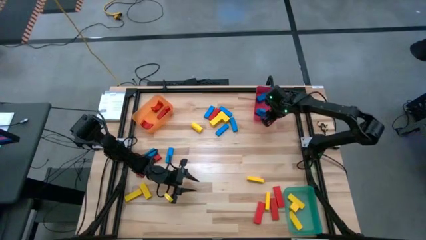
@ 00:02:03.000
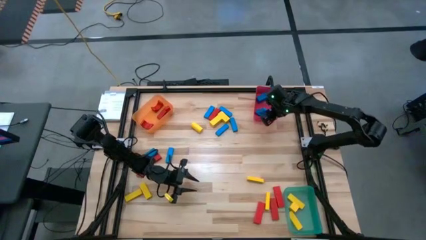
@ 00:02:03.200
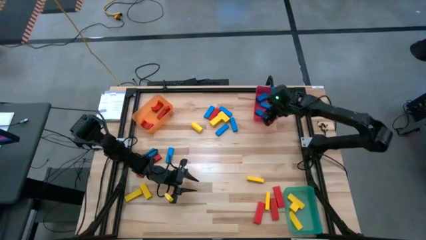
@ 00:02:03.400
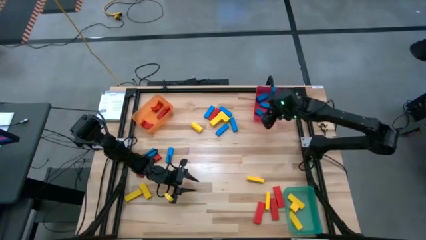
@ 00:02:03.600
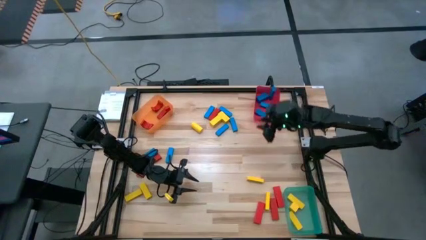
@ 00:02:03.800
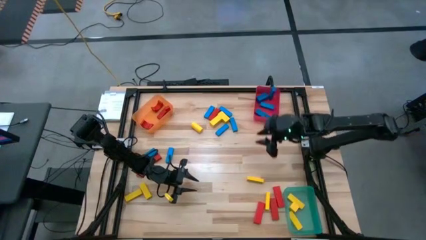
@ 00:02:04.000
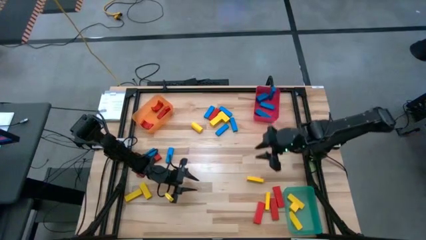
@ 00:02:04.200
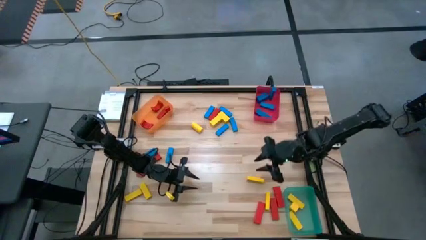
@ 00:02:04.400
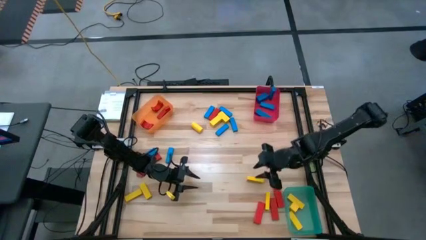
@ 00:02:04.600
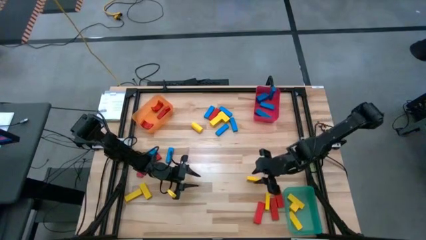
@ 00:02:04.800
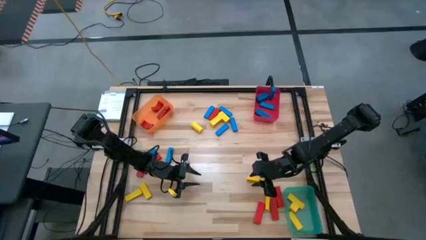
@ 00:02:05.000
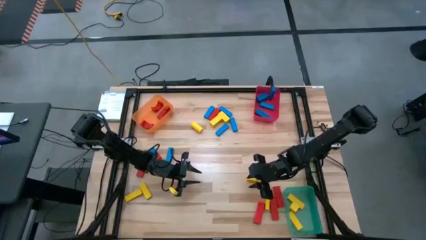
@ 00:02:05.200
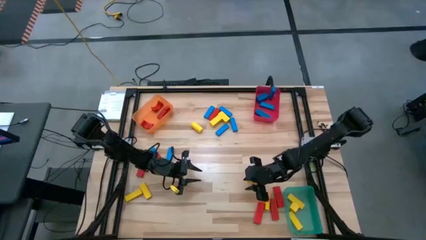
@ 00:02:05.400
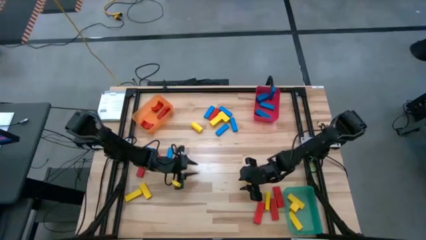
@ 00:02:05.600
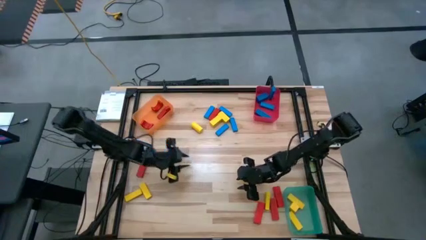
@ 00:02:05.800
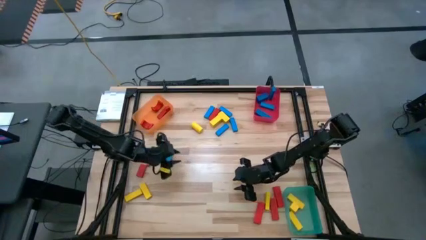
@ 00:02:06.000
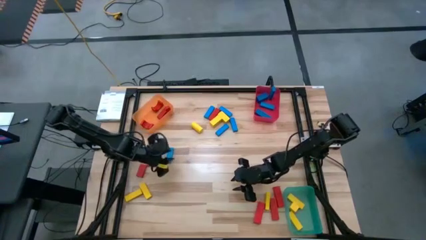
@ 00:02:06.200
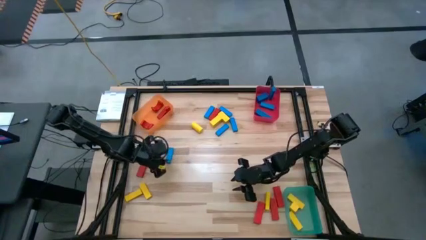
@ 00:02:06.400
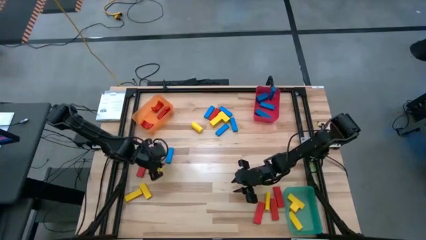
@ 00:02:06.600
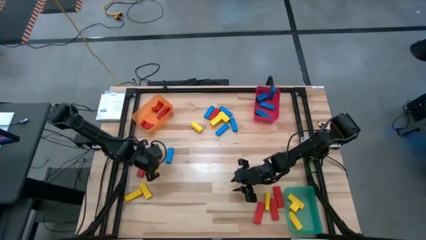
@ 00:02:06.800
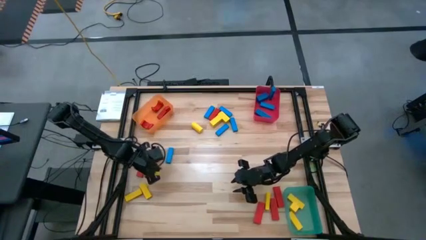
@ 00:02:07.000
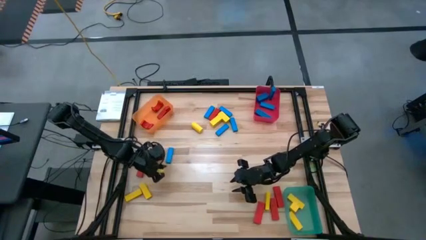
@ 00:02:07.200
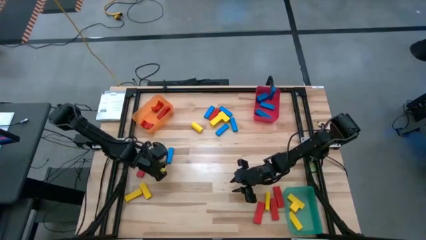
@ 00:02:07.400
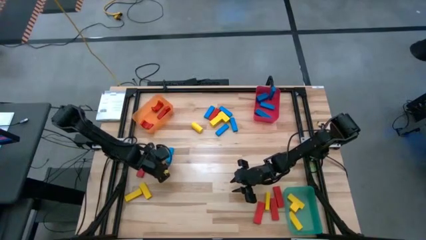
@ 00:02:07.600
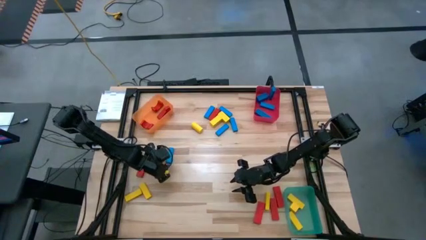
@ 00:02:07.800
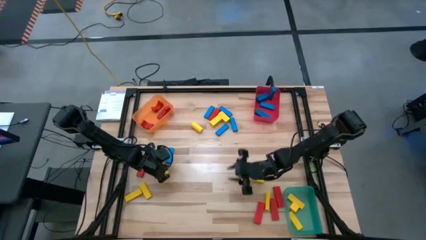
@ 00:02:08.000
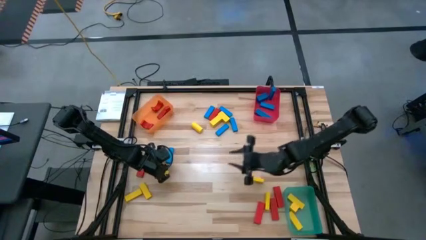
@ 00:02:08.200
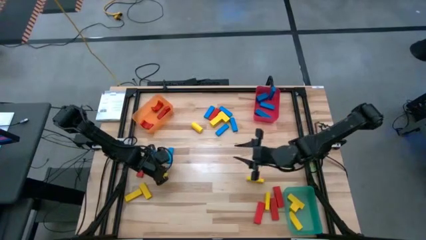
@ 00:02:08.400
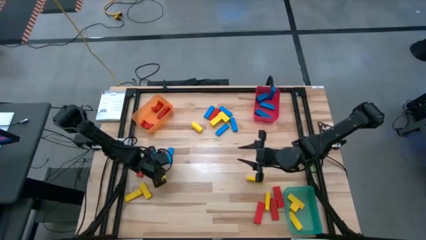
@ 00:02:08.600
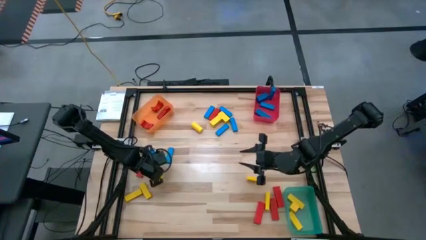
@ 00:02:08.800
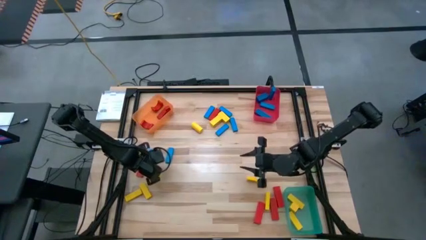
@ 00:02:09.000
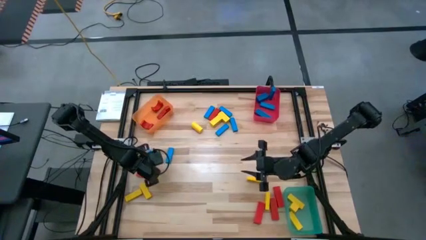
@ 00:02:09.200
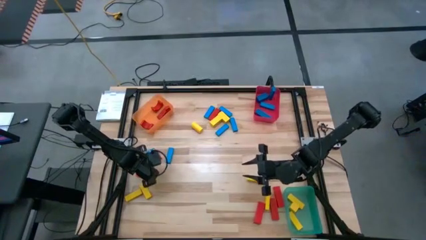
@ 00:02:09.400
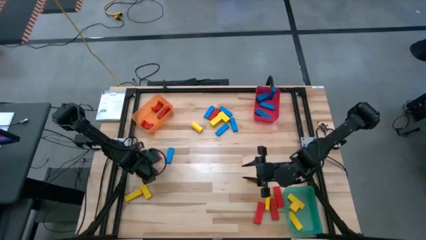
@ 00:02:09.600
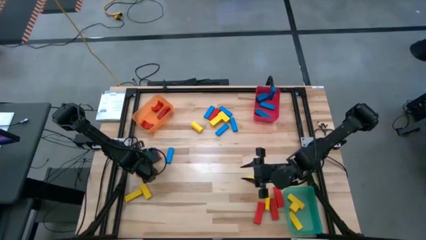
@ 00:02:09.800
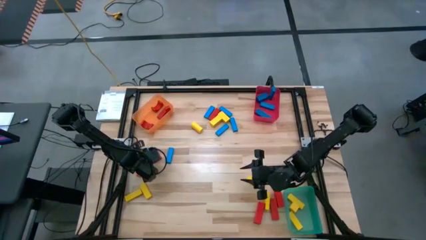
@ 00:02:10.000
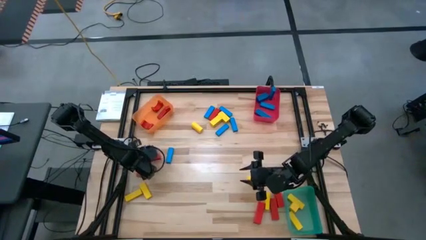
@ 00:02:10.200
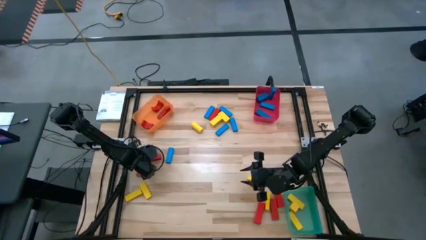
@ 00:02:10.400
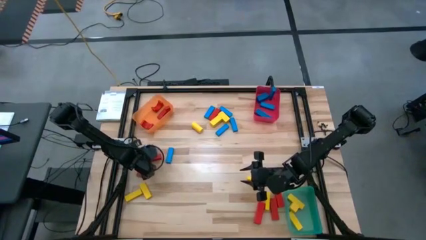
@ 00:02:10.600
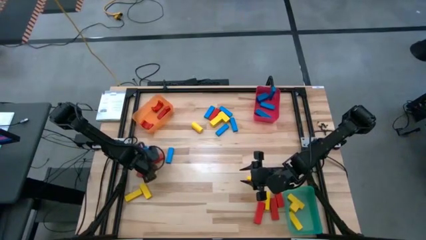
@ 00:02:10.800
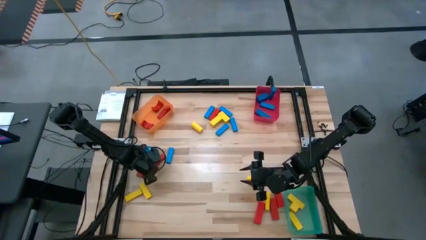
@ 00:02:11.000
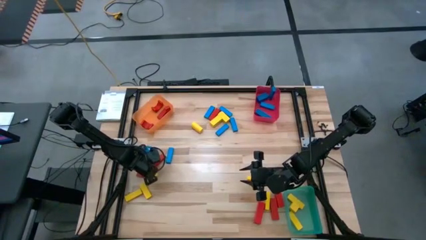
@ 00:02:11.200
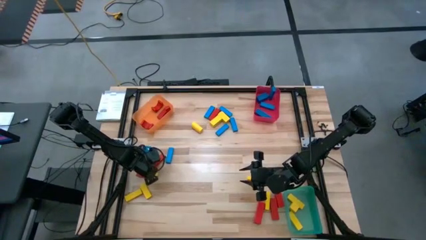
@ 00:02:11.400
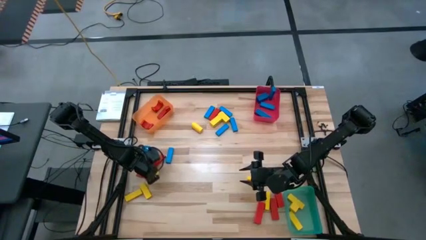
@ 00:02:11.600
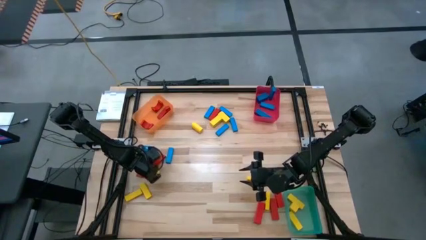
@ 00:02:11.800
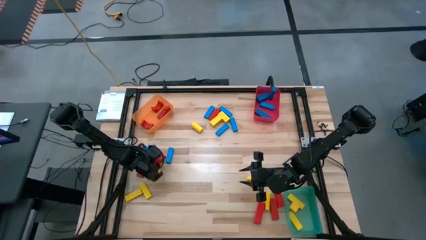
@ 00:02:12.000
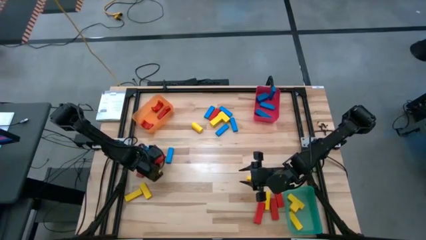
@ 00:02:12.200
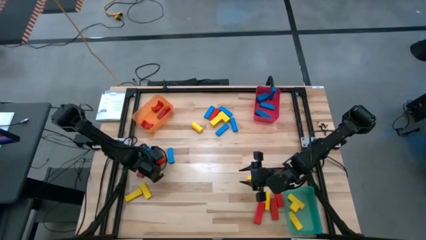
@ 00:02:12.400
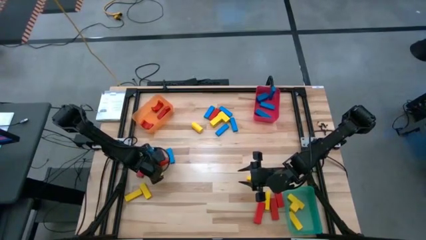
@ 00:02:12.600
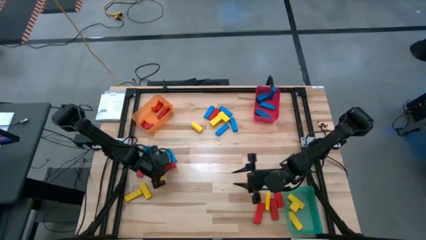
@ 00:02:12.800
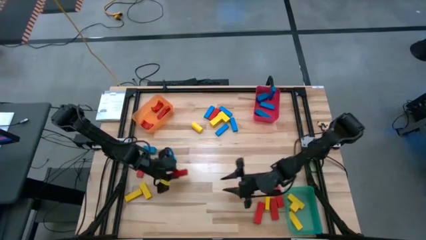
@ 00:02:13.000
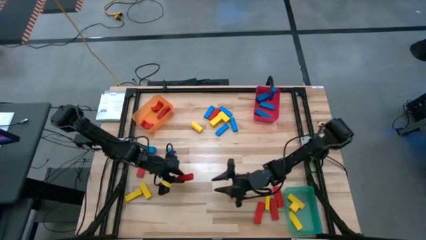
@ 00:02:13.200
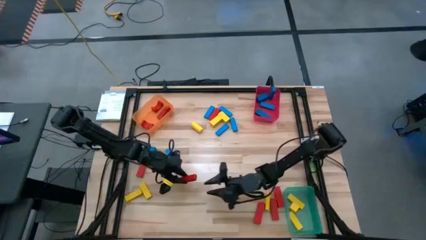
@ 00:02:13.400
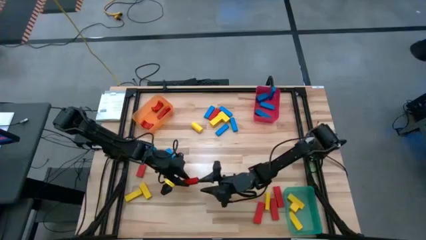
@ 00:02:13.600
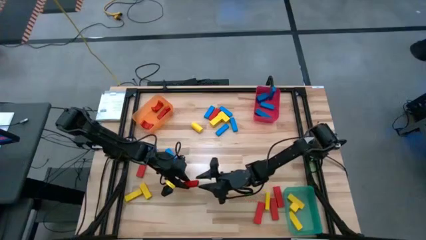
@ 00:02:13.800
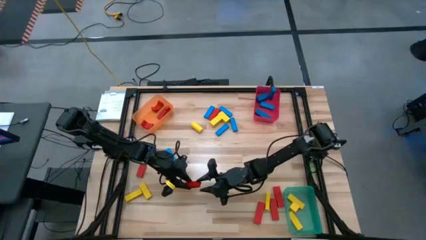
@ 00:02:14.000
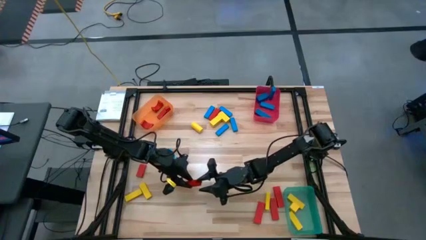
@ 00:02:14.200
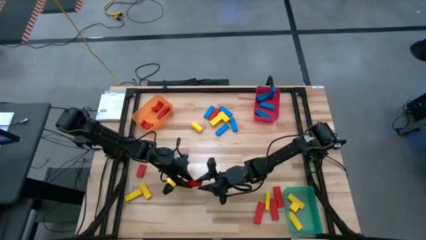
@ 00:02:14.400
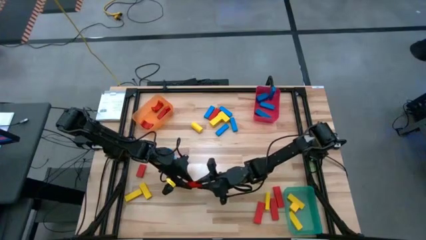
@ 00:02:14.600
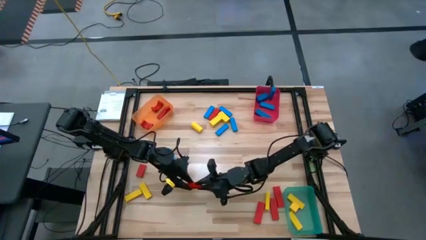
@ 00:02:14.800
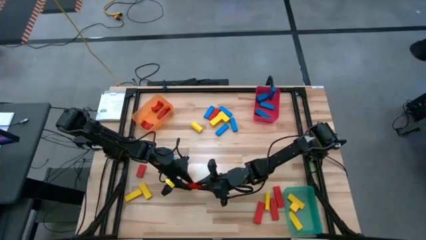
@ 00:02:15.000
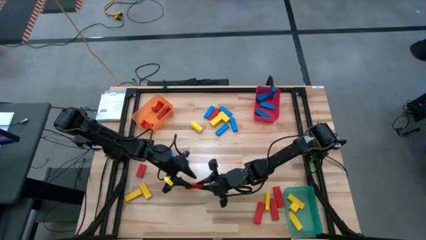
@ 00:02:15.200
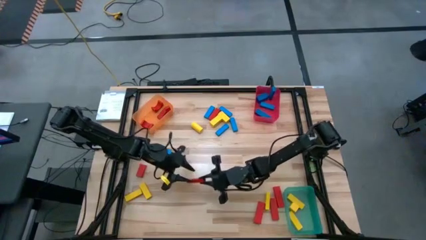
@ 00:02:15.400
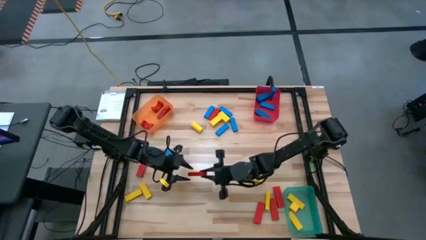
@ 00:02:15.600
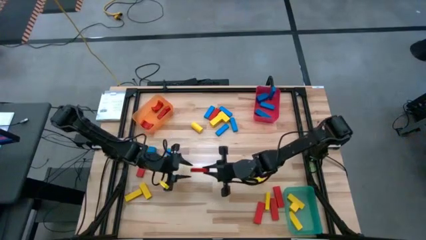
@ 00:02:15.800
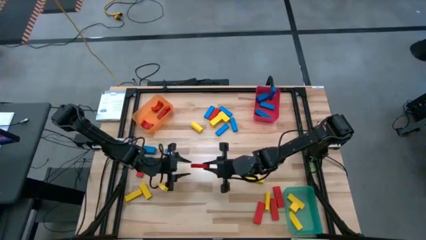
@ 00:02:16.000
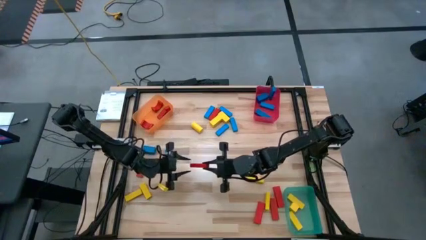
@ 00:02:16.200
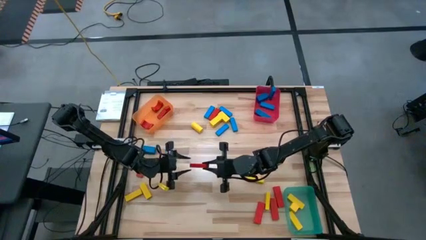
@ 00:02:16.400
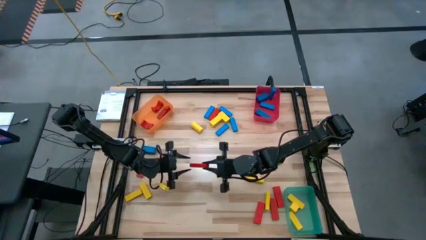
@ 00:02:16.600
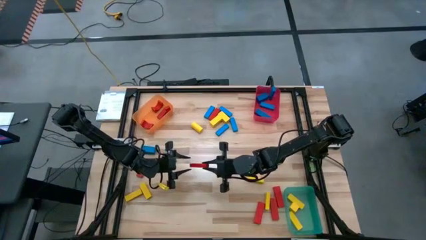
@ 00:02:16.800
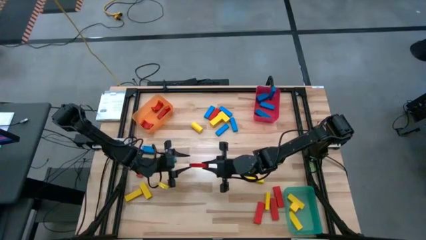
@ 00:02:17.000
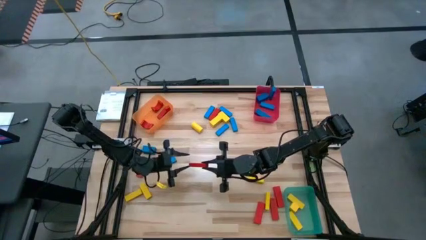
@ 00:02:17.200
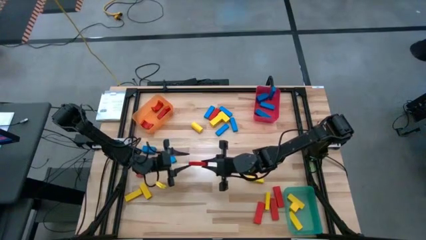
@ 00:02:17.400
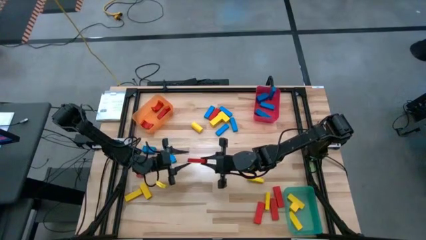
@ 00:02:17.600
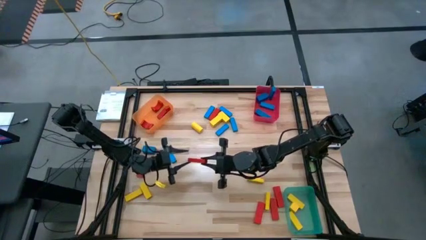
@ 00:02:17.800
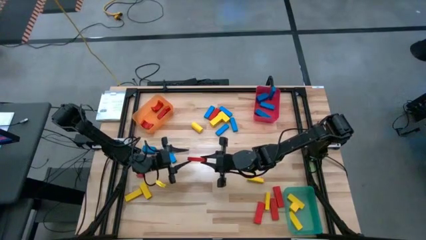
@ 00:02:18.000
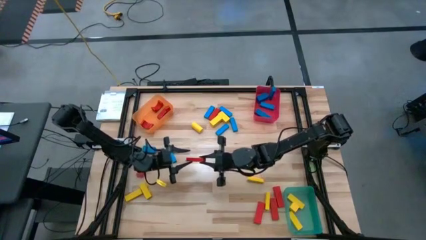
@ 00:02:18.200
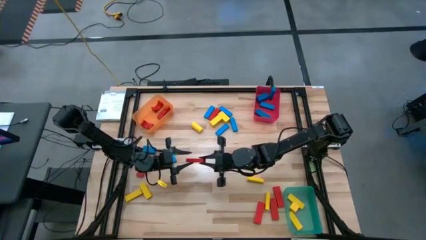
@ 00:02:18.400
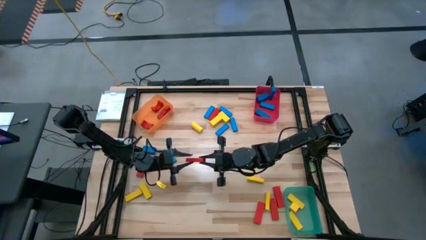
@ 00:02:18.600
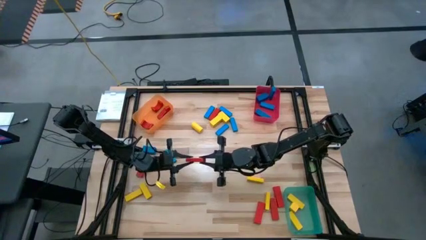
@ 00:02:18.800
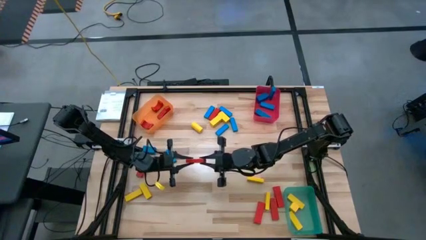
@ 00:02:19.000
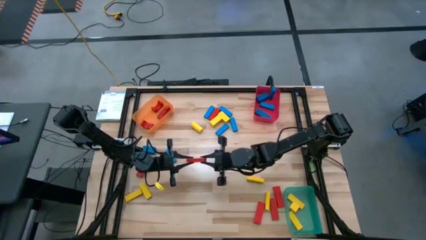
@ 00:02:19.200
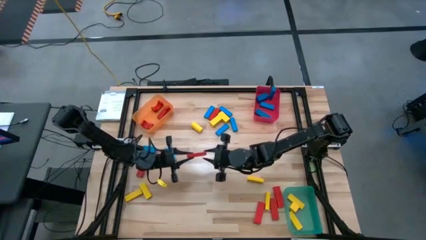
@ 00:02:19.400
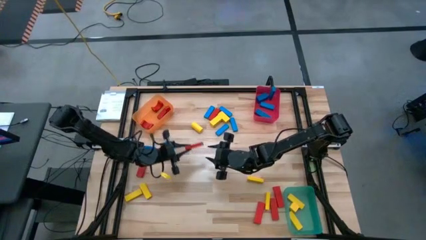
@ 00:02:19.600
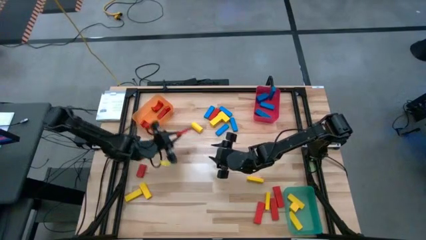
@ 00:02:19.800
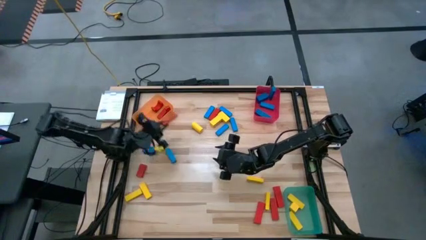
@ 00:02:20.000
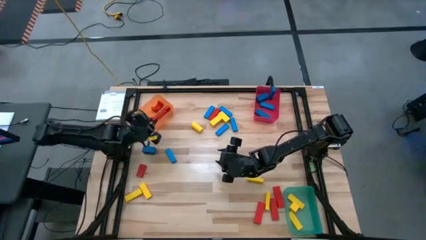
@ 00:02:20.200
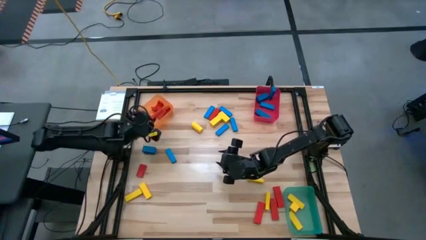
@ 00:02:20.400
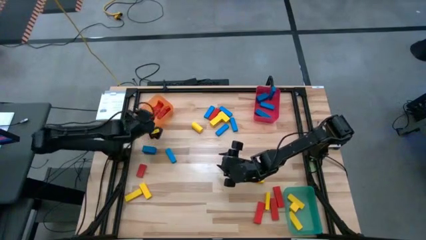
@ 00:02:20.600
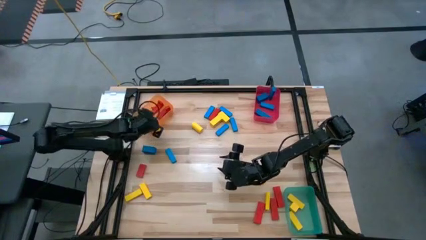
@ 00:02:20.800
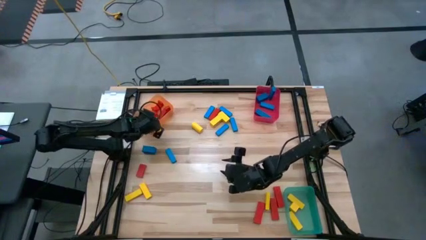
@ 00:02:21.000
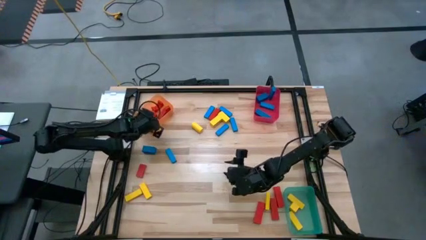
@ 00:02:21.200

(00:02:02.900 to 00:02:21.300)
Task: Sort blocks
Put the red block into the orange bin
